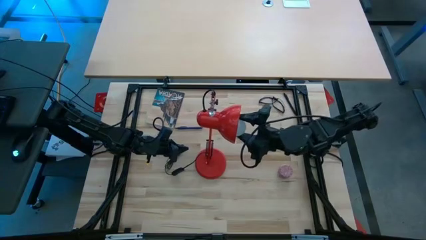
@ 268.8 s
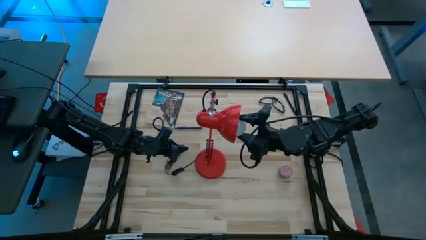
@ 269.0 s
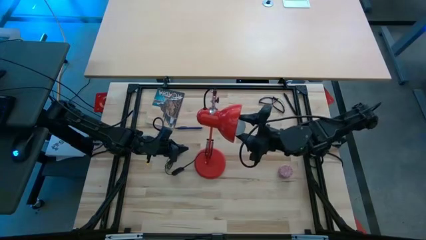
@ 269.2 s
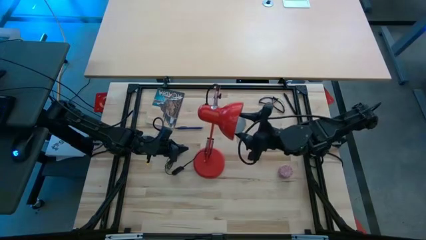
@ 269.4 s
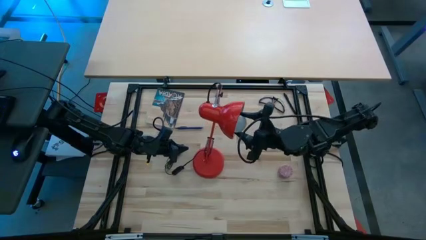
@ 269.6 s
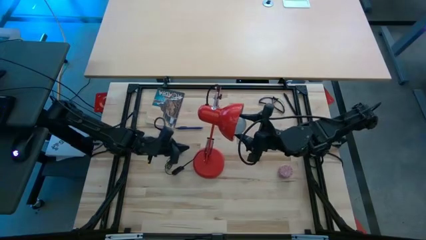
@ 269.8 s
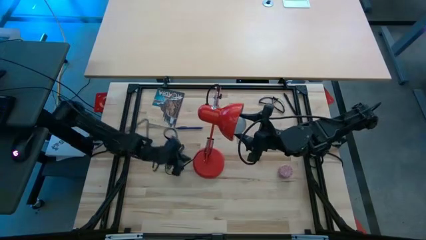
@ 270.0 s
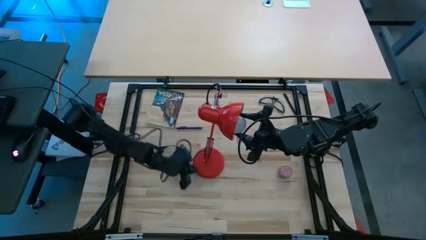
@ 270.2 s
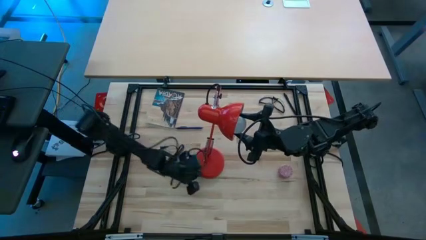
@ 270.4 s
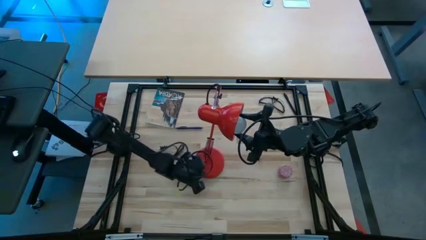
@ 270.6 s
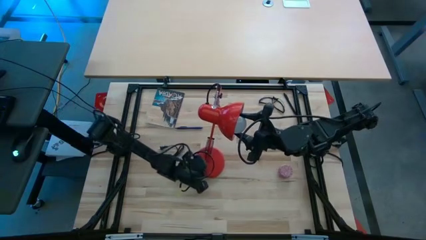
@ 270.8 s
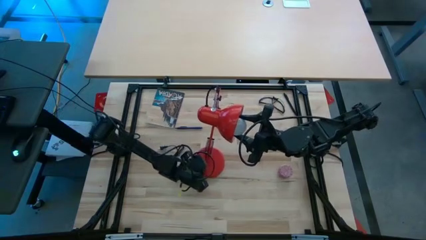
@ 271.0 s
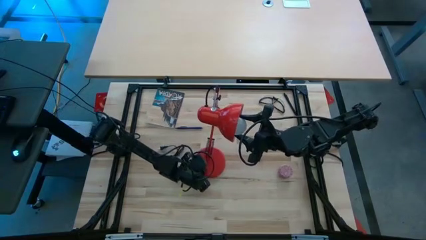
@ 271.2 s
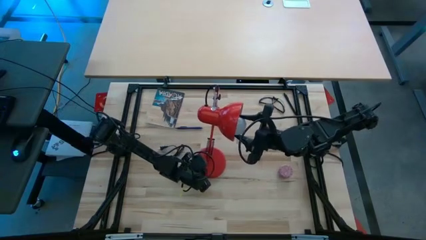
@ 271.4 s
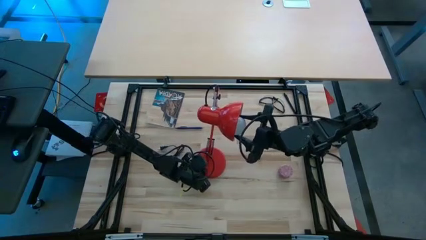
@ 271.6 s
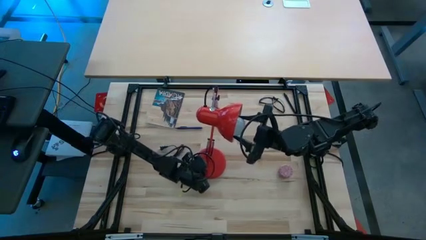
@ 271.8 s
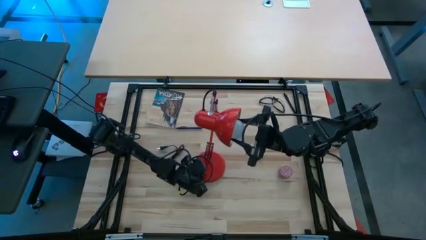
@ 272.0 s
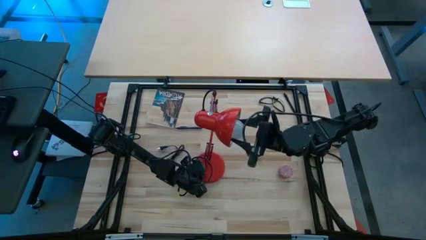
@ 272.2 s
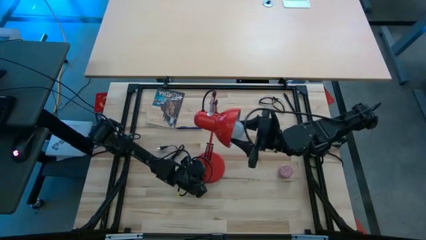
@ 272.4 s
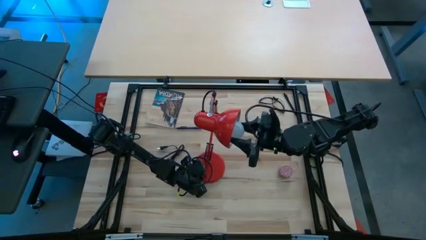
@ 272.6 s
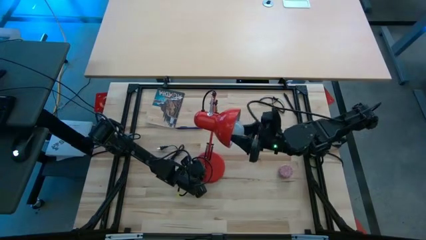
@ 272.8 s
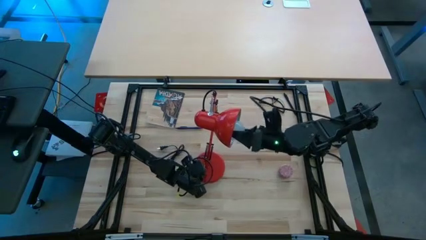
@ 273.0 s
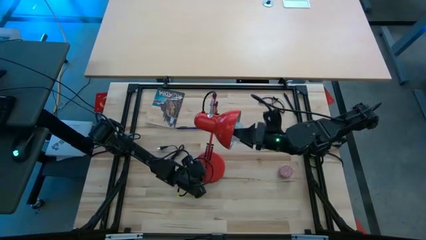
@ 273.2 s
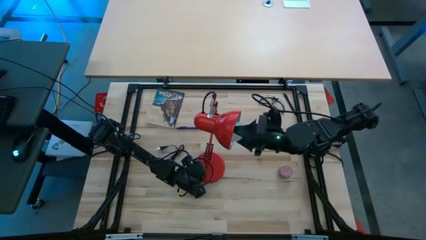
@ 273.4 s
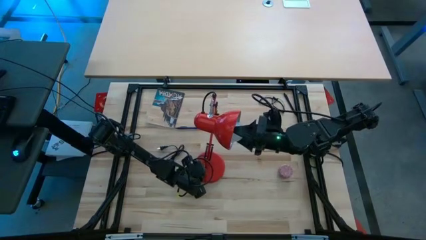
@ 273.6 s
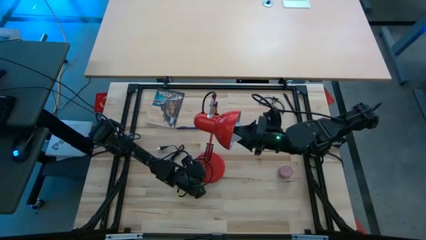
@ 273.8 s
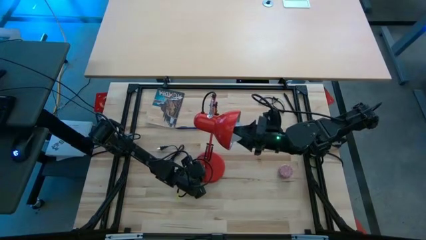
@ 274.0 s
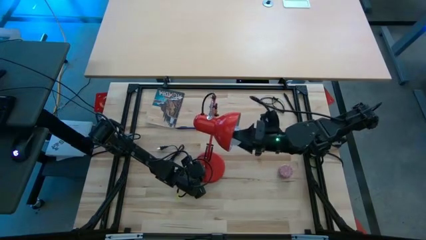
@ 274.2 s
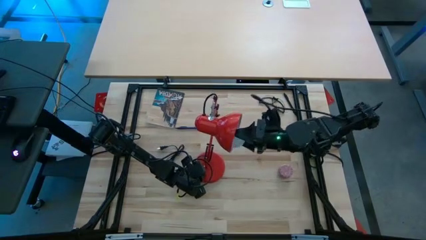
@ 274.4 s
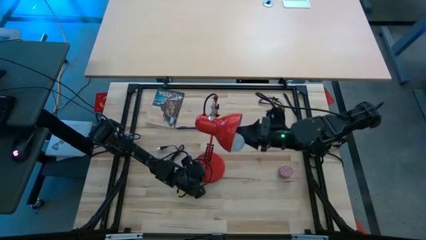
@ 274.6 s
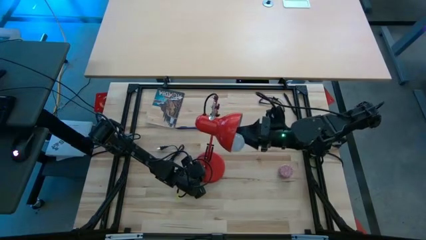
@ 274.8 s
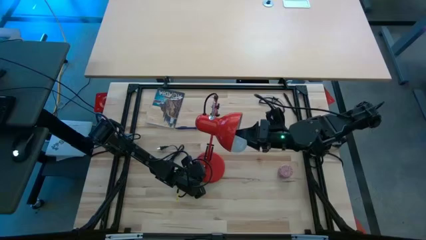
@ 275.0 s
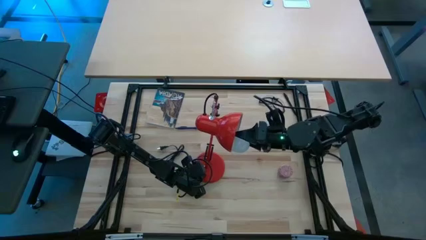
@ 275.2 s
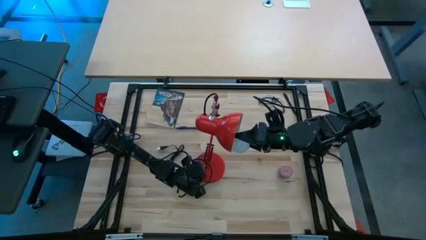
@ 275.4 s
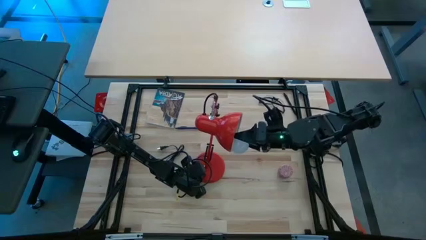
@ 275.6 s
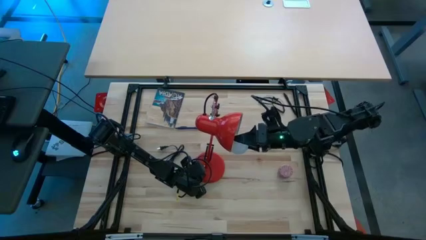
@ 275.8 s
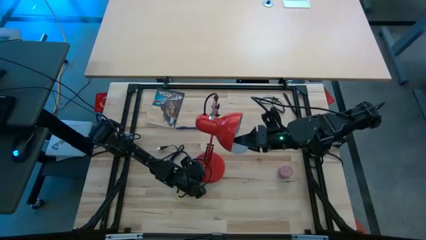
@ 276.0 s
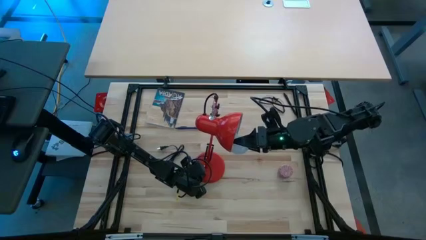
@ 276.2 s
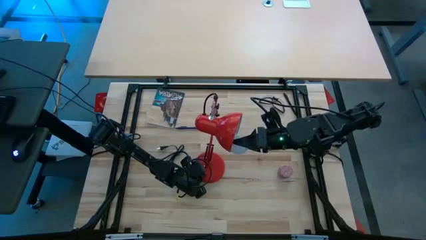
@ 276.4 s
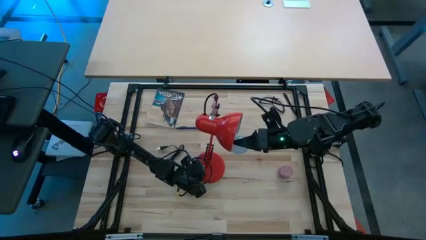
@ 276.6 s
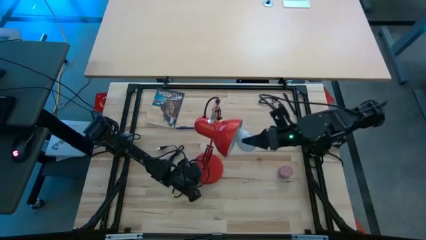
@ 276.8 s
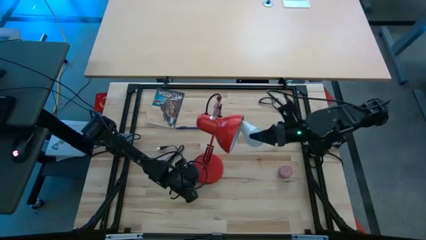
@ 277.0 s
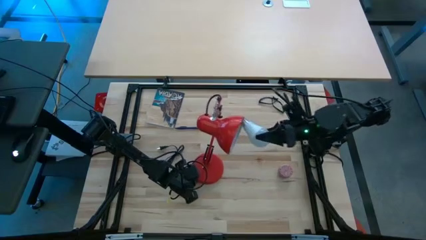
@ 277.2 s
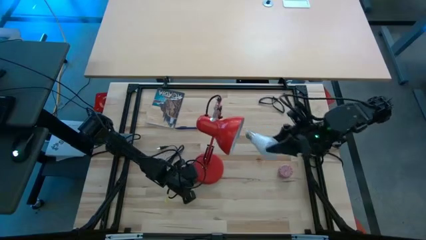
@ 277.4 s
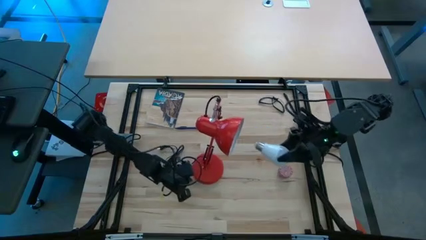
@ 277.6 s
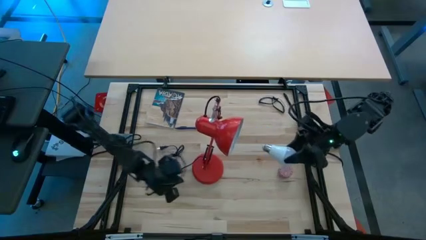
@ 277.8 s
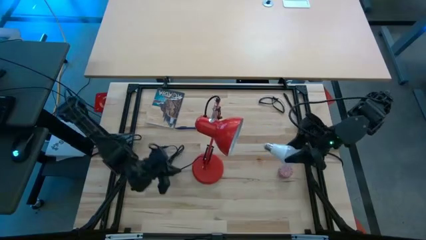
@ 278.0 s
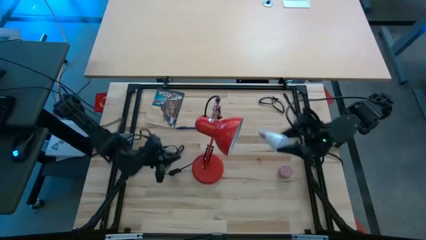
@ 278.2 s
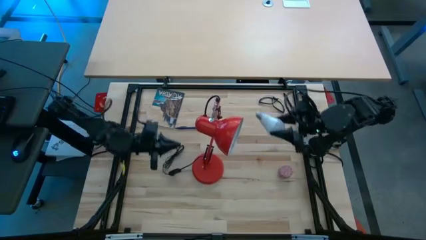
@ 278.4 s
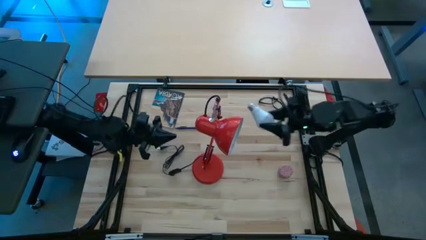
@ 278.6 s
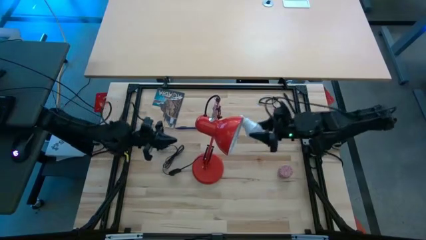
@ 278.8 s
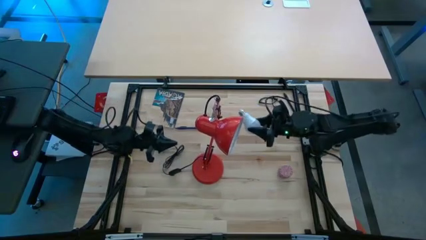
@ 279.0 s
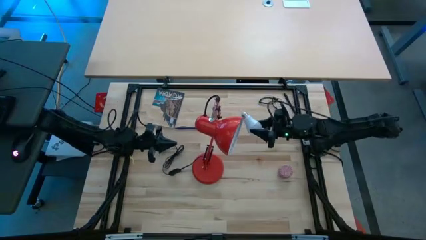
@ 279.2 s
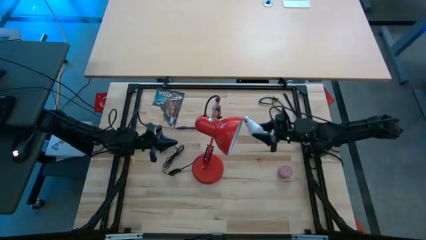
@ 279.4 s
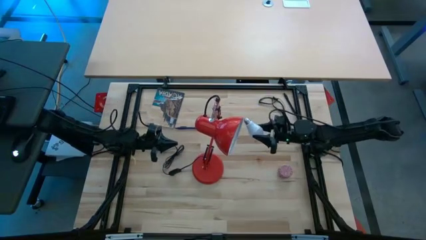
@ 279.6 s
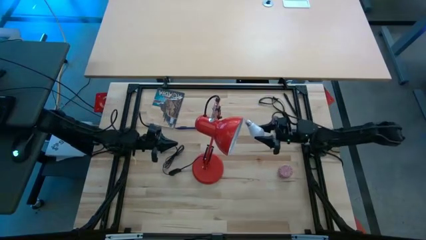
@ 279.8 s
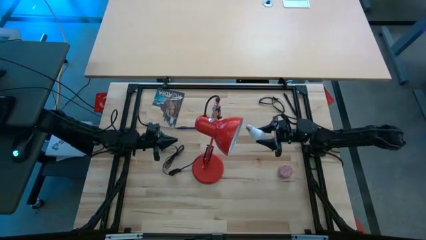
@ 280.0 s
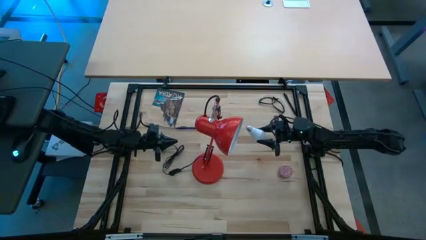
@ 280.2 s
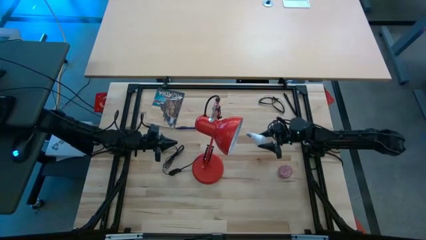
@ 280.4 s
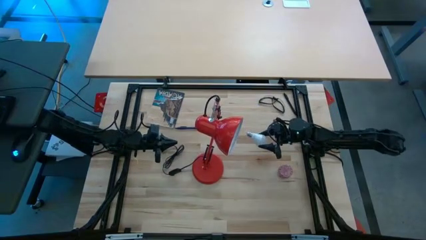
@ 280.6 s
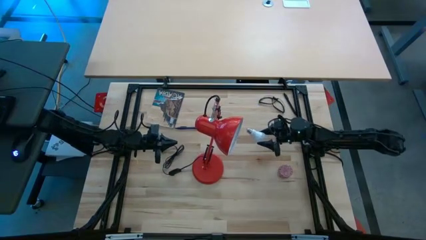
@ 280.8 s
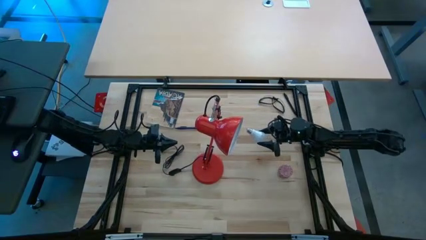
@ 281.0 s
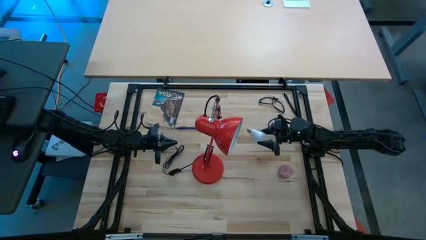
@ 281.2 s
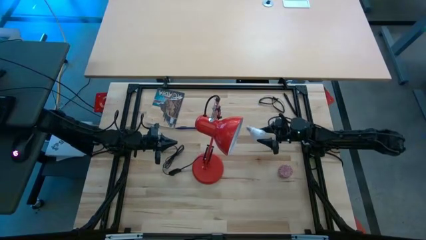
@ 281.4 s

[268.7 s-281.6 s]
Task: Screw lightbulb
Remove the lightbulb from the lamp

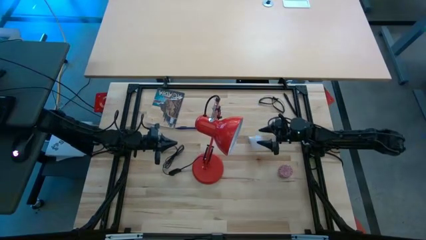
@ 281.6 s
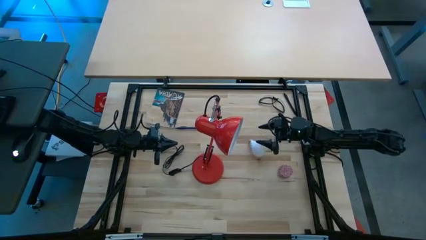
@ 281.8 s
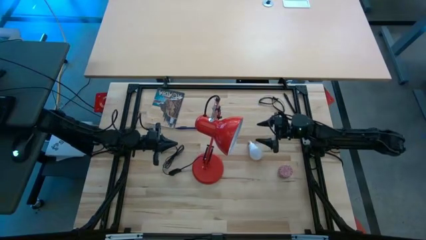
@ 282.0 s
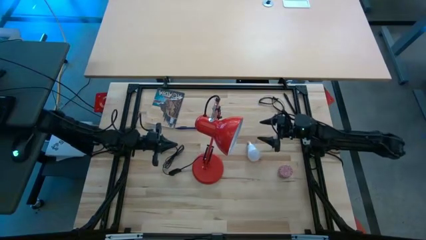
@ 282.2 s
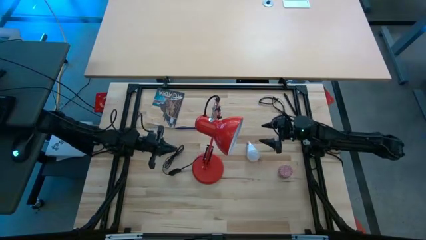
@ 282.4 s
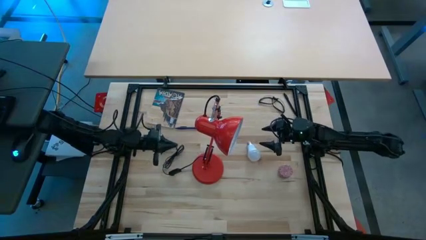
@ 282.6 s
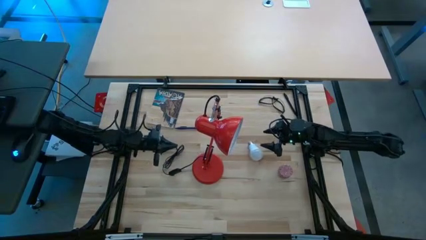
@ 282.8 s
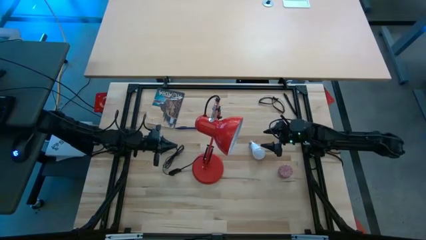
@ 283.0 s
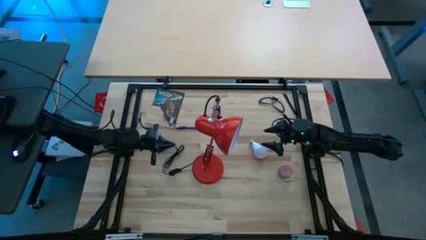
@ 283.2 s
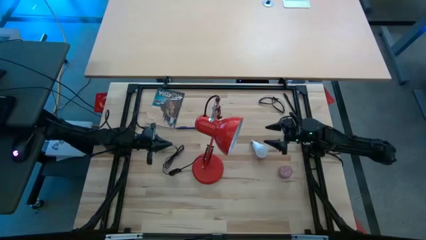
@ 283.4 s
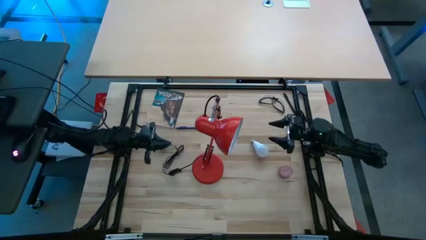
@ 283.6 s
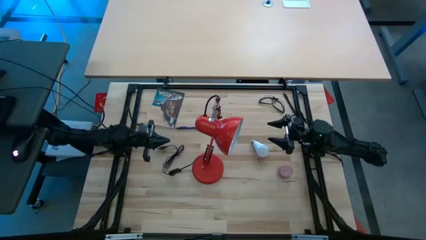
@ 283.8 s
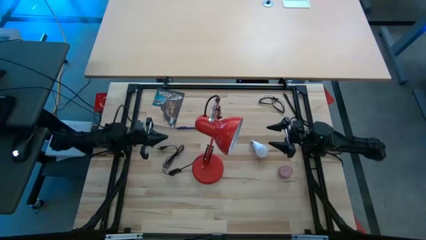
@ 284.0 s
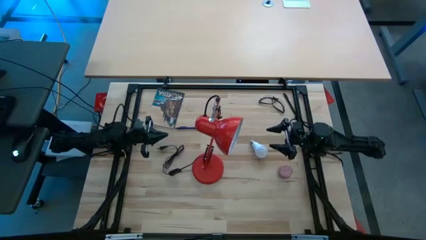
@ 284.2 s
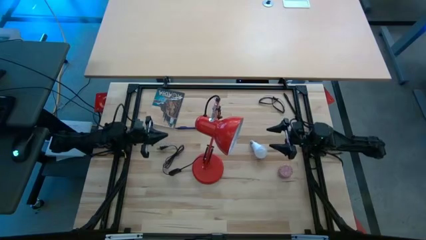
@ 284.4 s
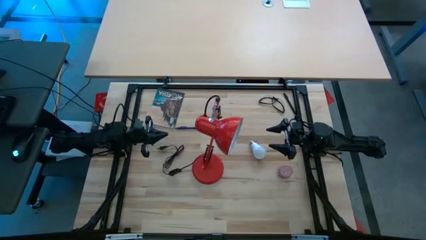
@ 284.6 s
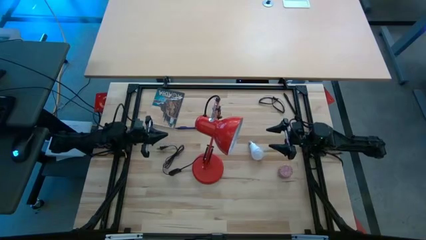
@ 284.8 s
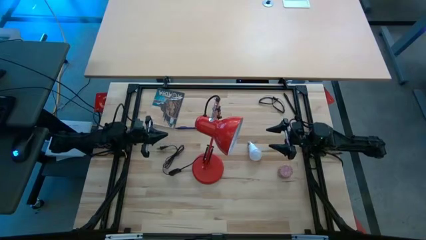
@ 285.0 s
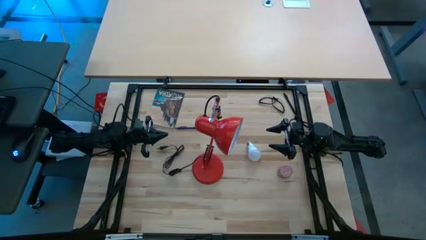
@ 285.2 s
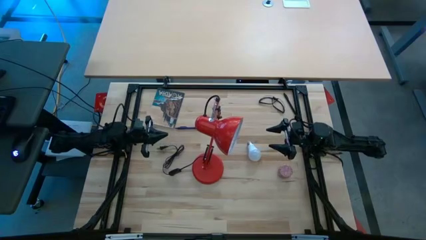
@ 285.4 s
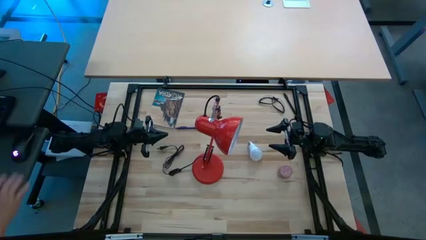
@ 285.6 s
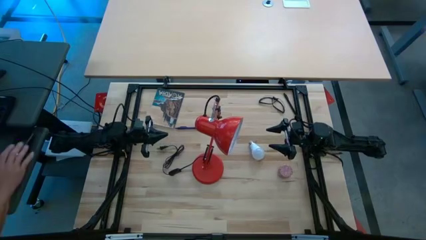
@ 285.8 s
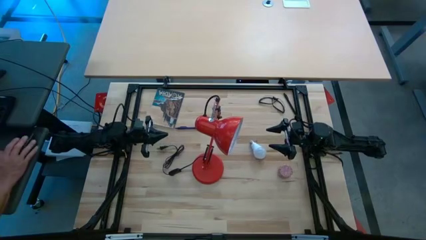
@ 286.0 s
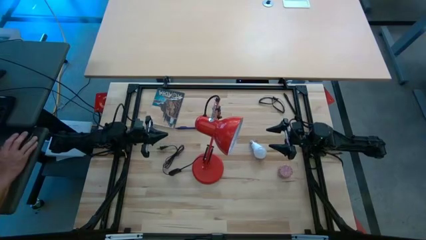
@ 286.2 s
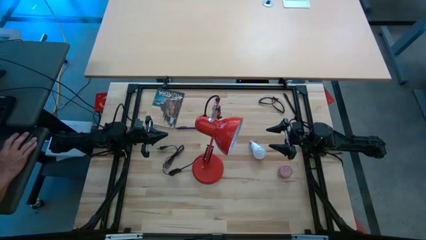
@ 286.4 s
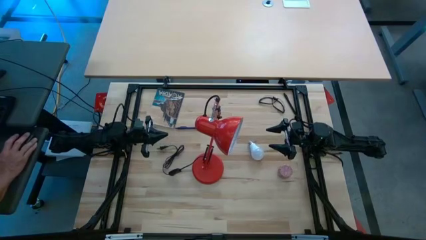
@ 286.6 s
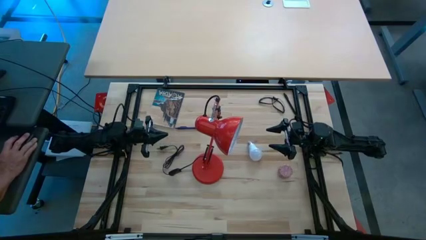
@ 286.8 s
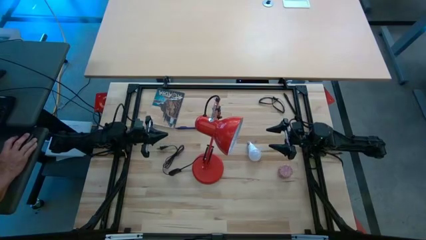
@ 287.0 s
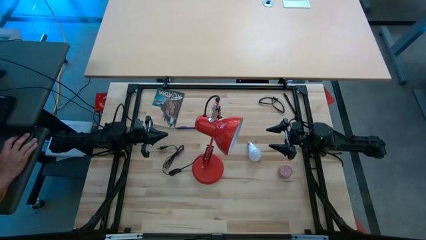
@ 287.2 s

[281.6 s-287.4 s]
Return to Home Position
